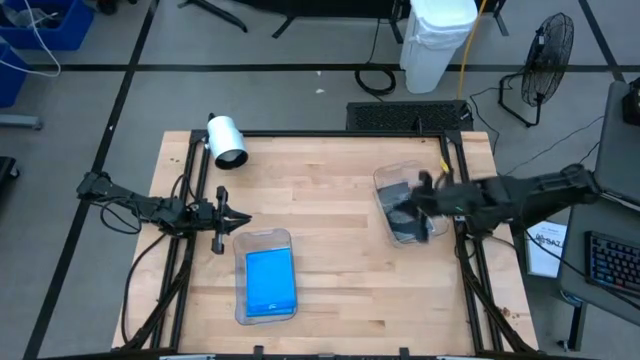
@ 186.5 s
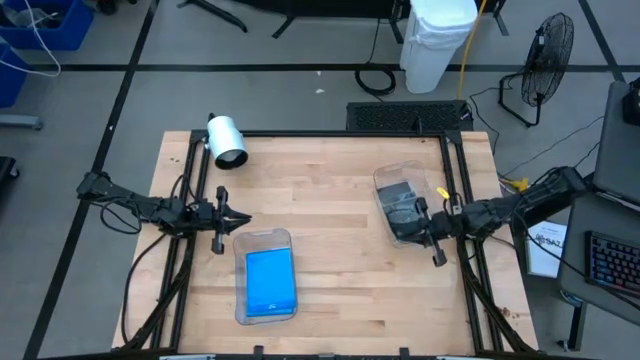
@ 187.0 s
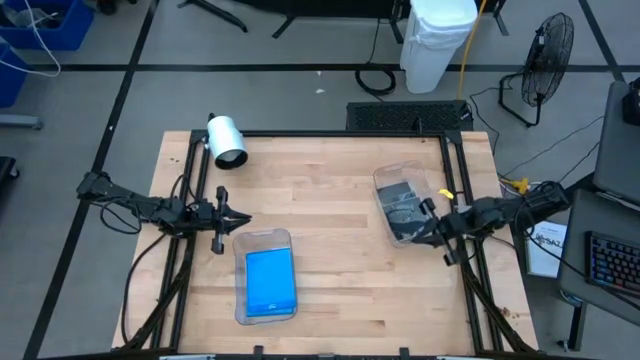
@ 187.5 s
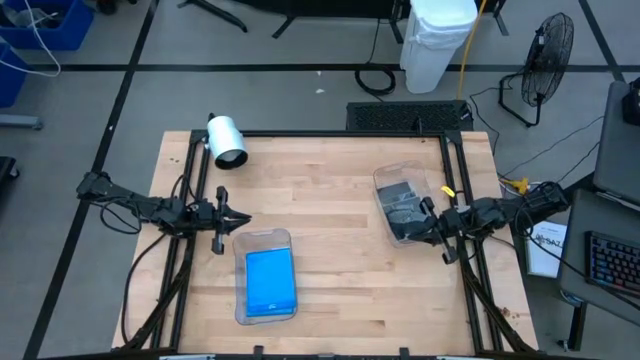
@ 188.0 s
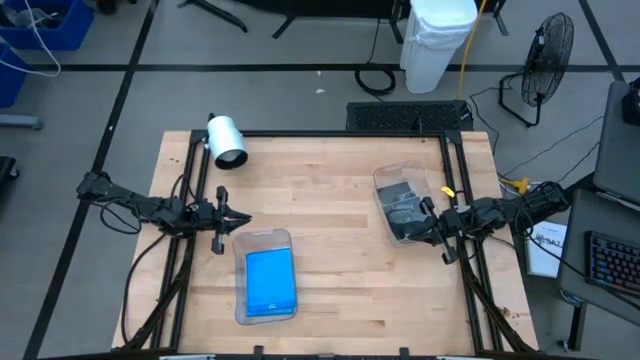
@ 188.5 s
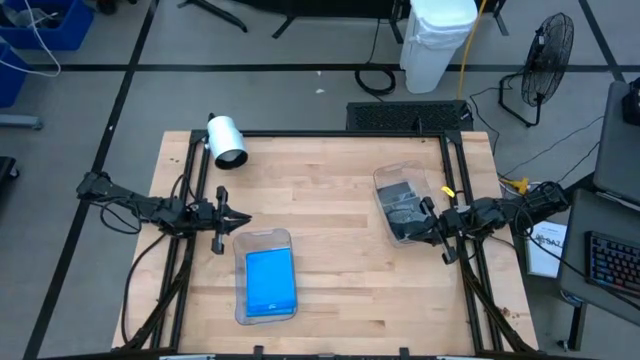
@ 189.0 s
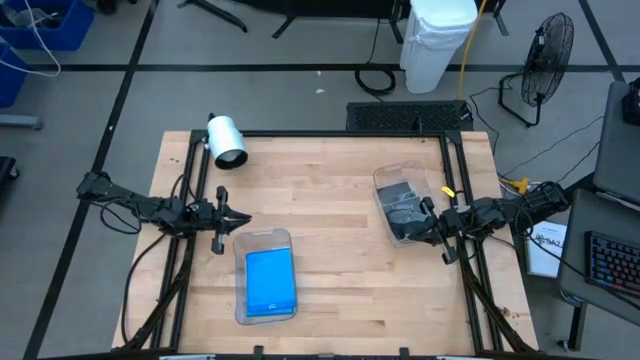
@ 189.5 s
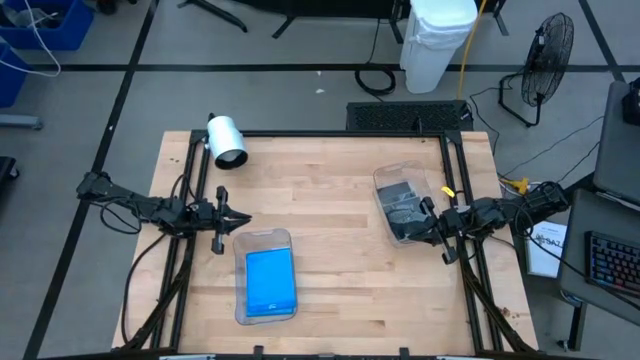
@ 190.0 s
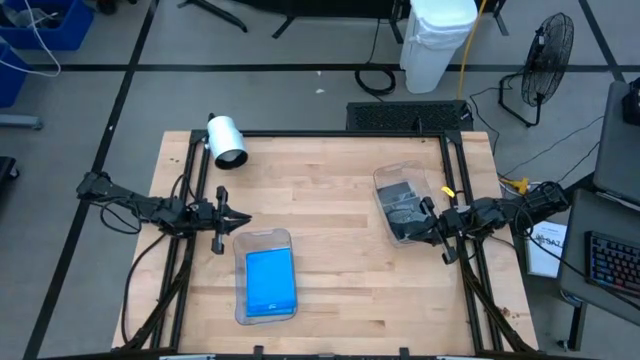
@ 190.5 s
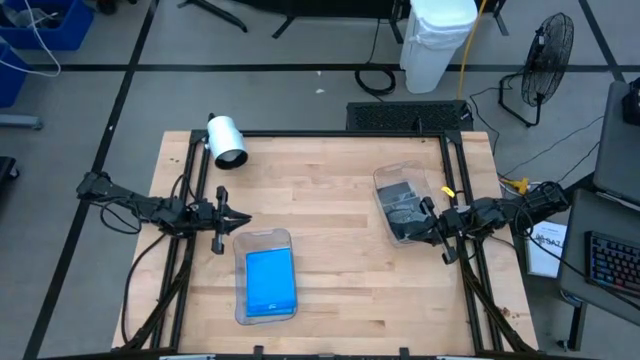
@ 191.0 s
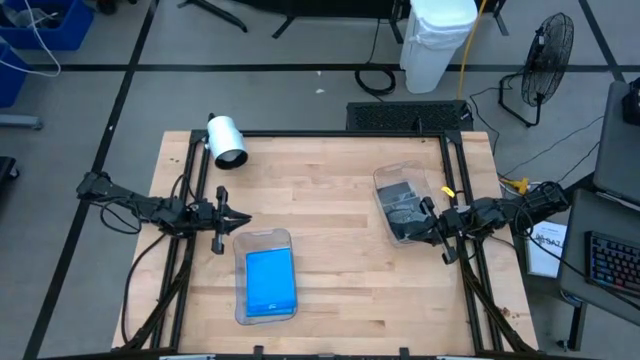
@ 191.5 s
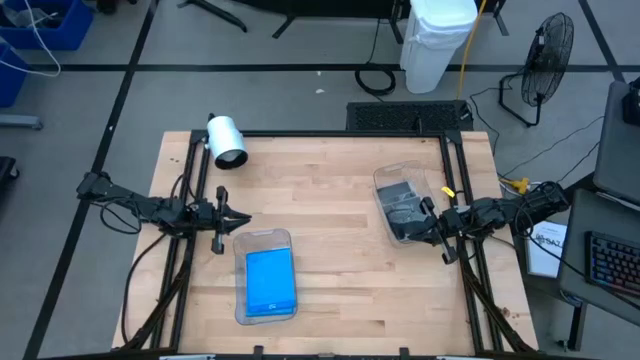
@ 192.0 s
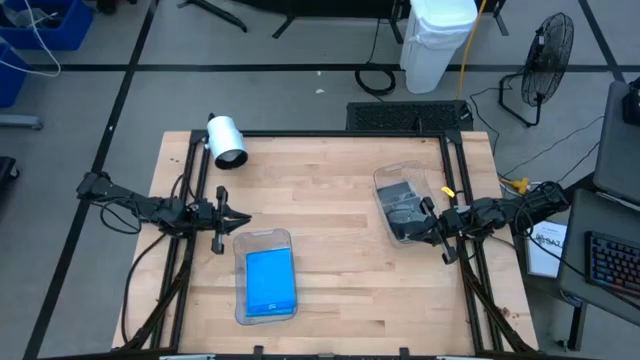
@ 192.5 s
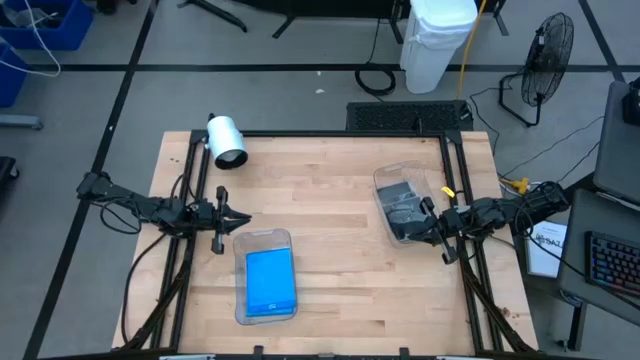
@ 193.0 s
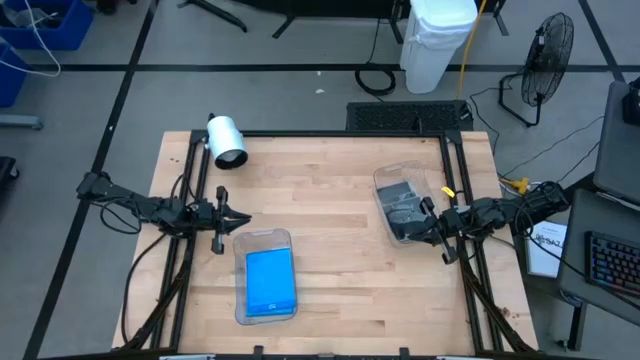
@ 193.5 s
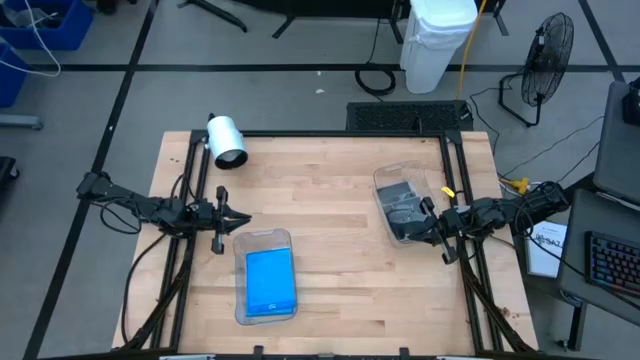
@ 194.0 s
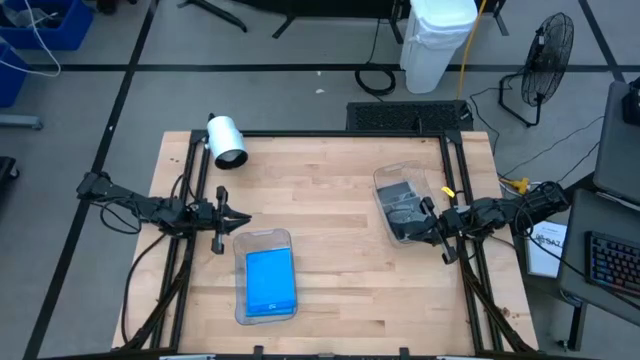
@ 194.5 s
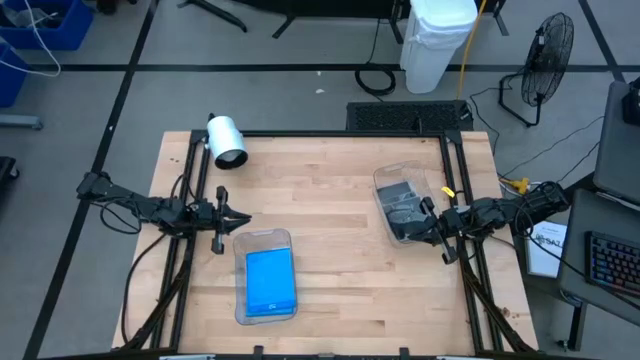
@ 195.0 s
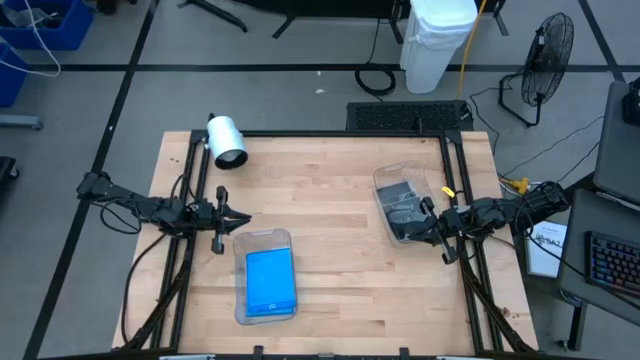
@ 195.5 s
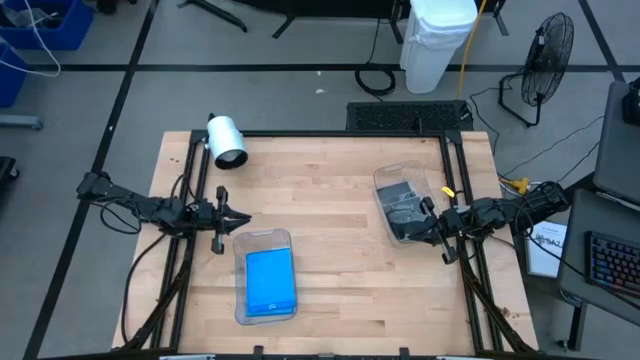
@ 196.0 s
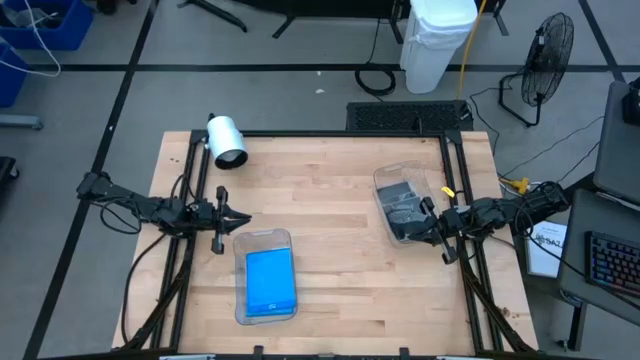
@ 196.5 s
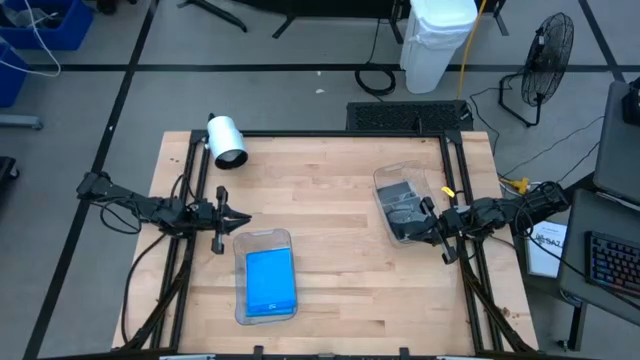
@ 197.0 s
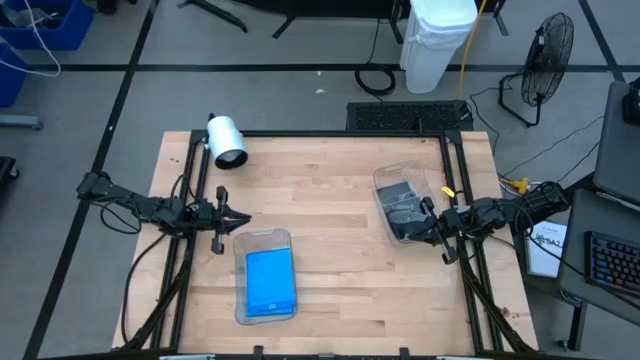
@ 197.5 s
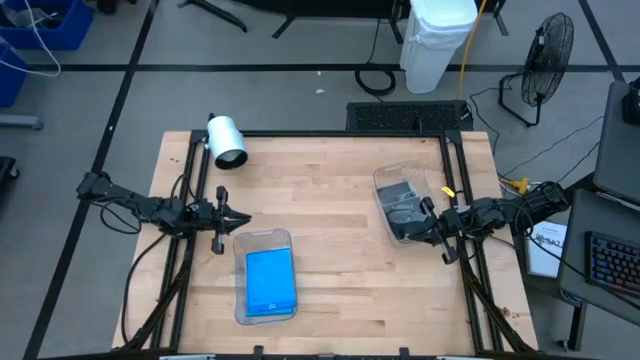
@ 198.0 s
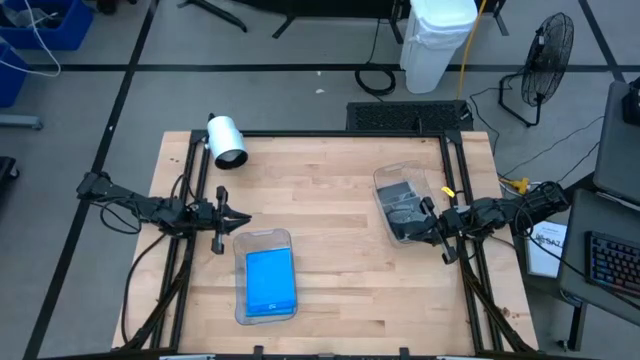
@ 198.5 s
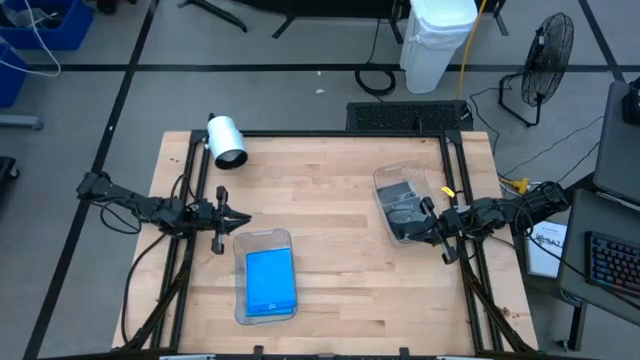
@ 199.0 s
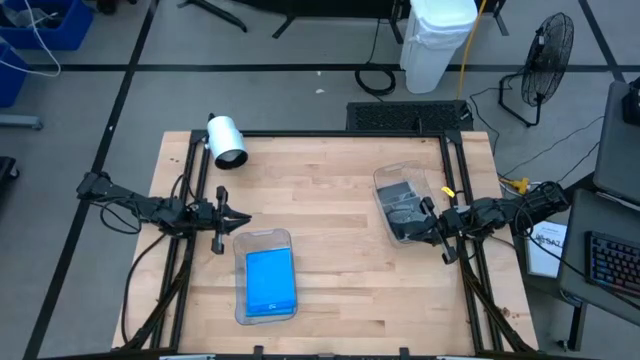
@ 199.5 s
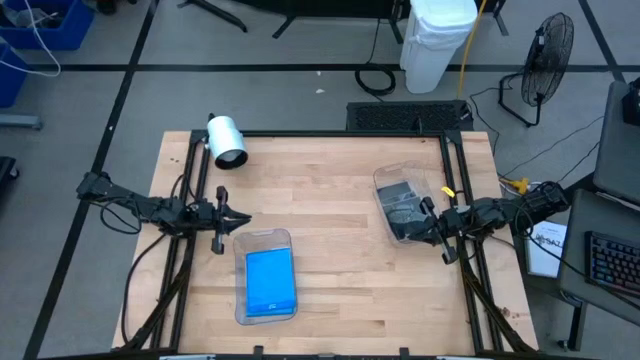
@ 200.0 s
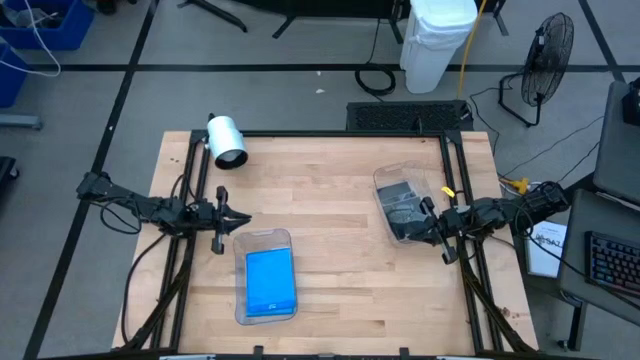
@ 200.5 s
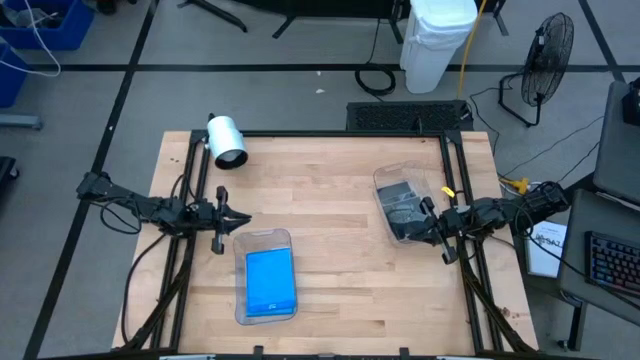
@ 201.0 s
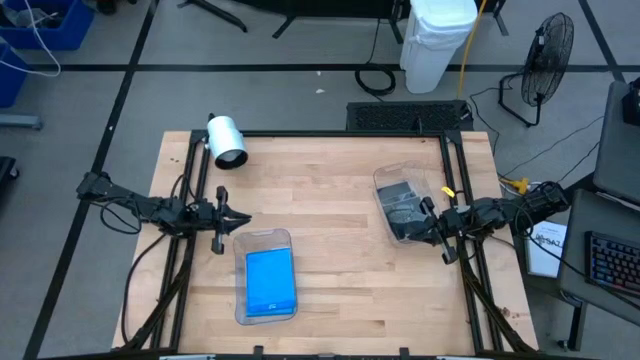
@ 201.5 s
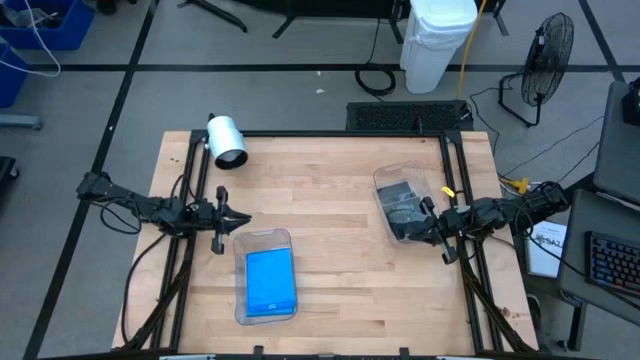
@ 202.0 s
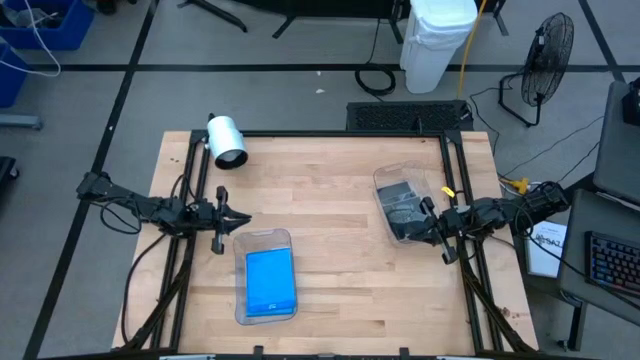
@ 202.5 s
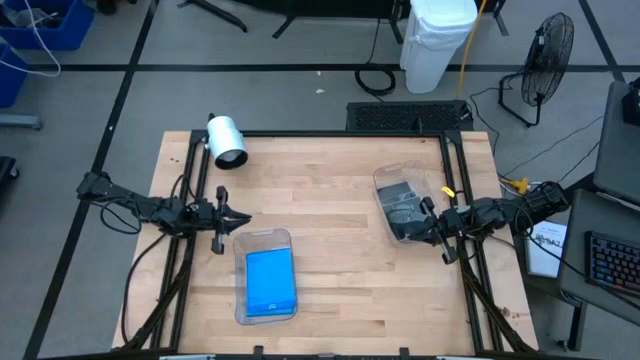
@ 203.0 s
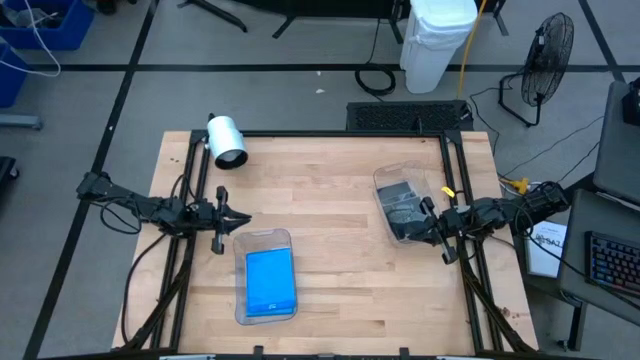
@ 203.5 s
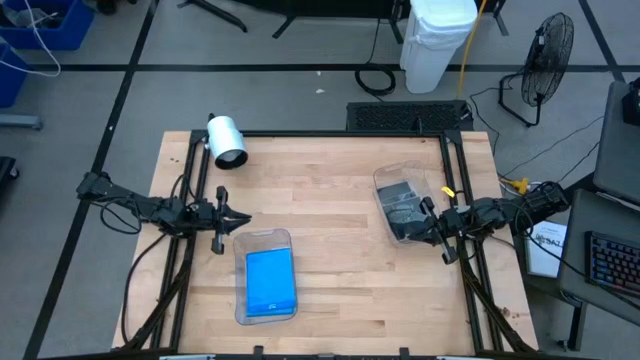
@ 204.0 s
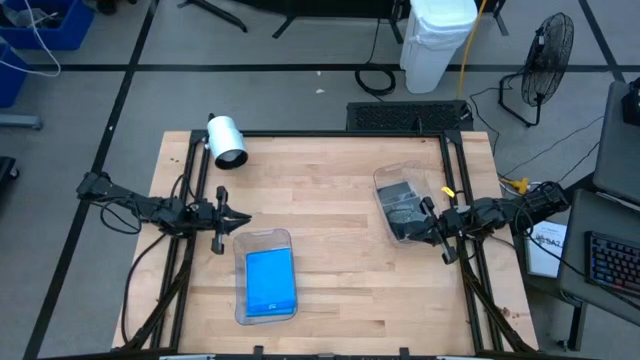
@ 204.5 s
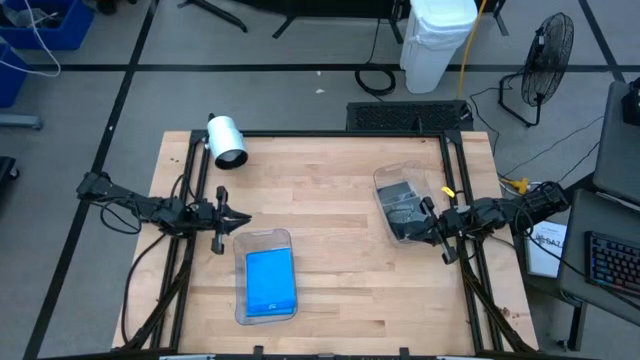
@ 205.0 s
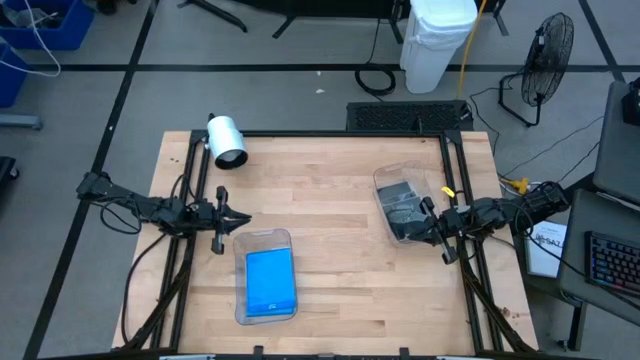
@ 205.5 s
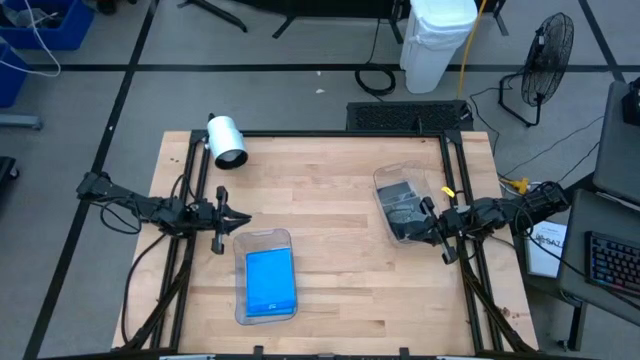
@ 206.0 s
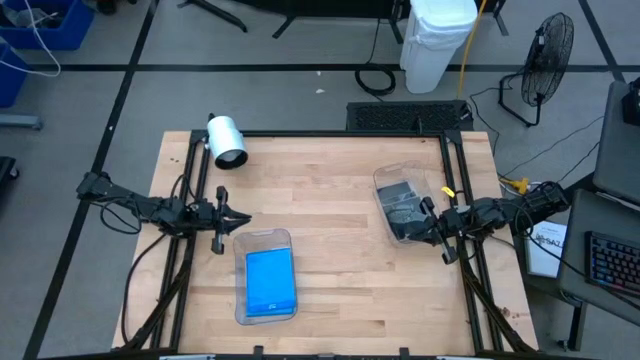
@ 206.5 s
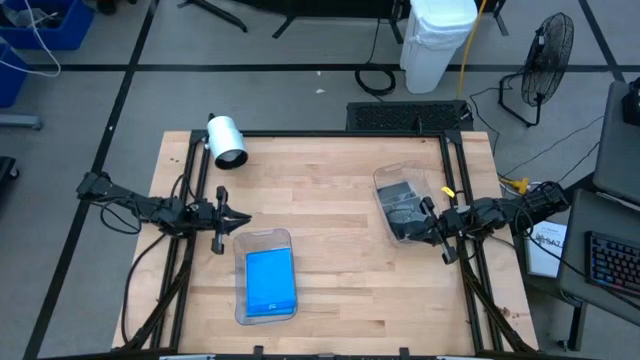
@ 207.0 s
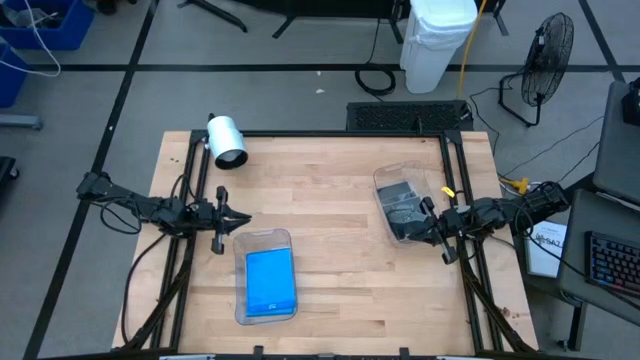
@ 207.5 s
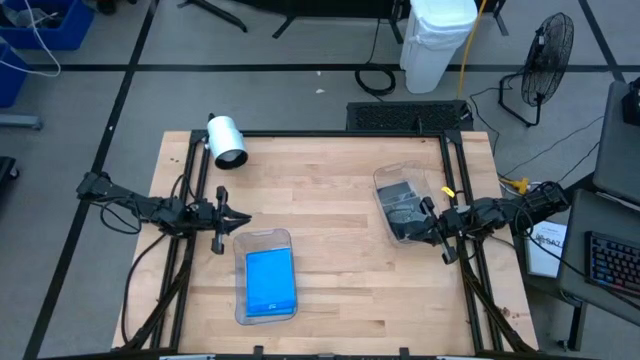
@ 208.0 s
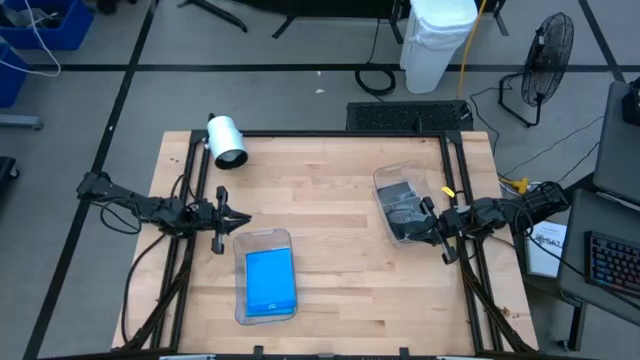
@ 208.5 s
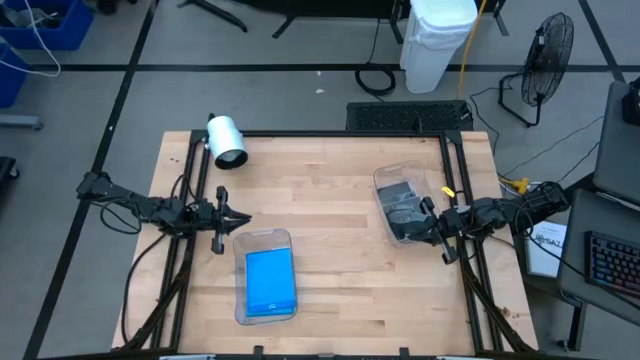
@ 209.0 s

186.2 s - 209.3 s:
Task: Pick & place jewel cases by type
Return to Home Position
